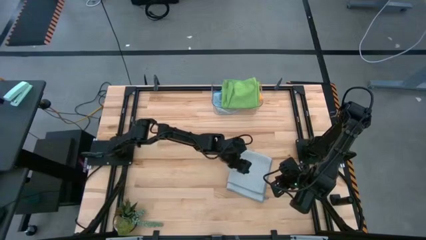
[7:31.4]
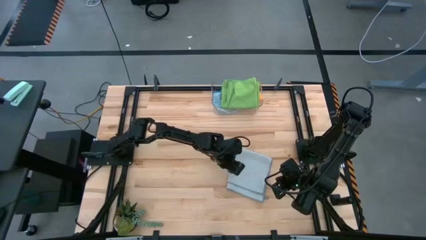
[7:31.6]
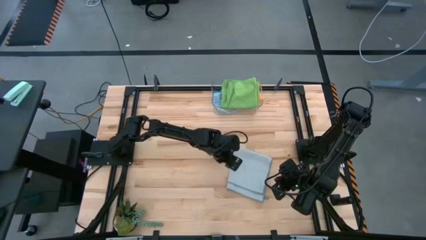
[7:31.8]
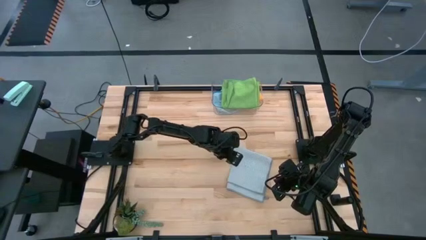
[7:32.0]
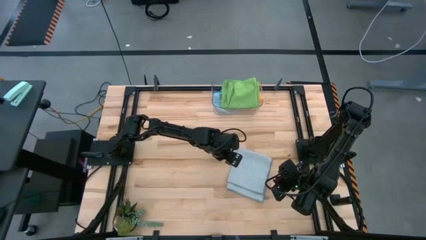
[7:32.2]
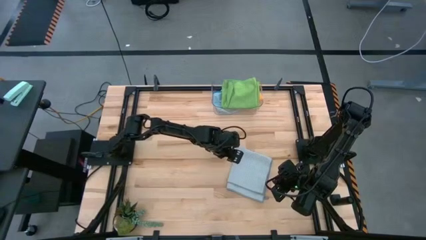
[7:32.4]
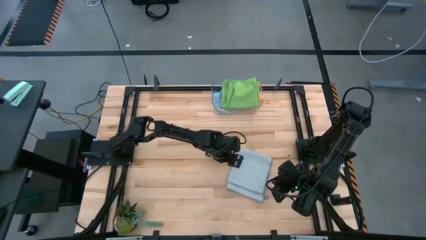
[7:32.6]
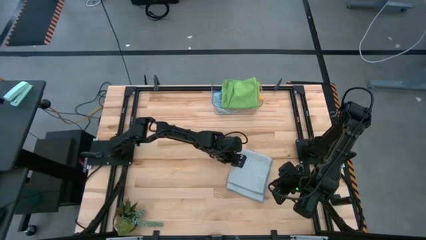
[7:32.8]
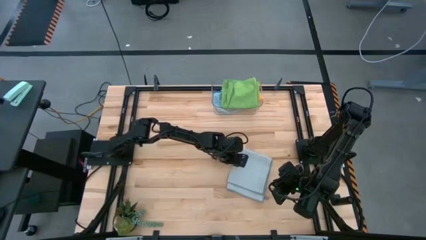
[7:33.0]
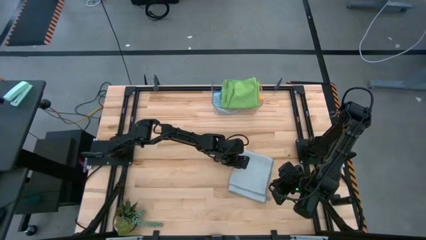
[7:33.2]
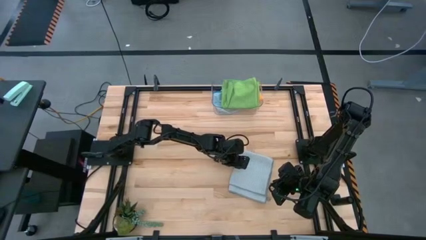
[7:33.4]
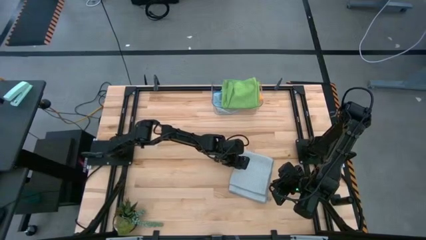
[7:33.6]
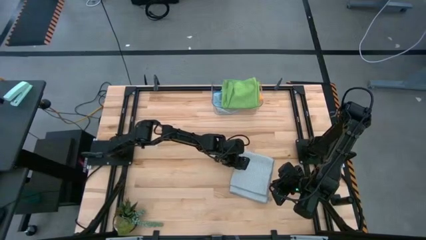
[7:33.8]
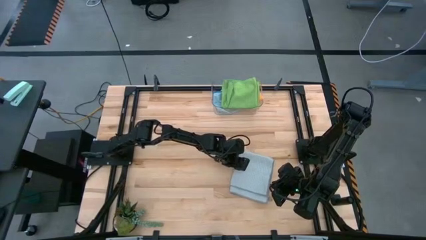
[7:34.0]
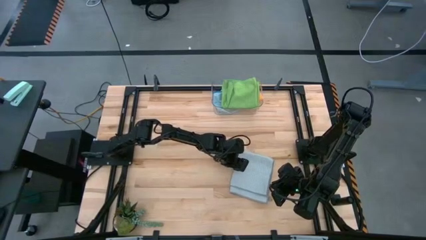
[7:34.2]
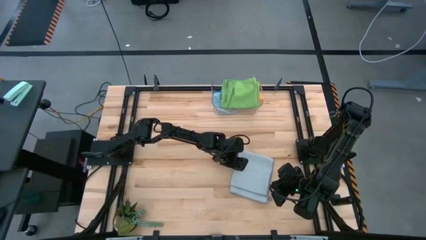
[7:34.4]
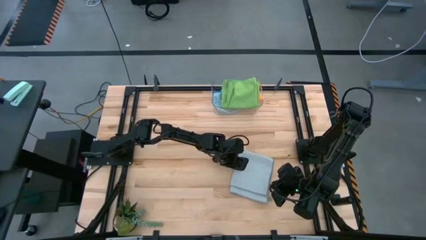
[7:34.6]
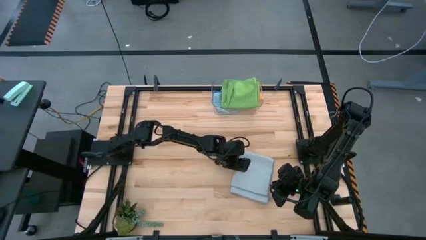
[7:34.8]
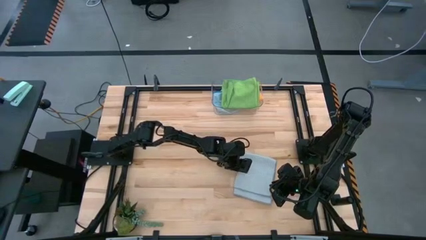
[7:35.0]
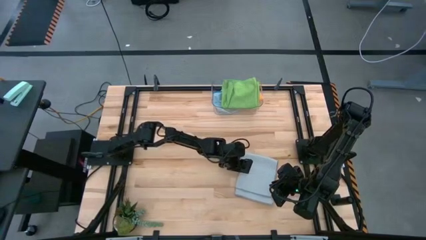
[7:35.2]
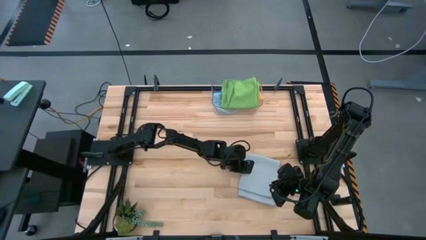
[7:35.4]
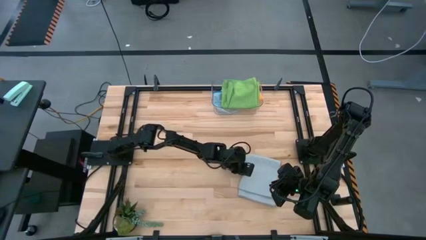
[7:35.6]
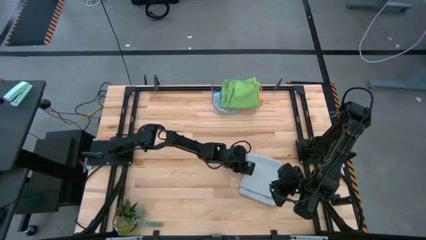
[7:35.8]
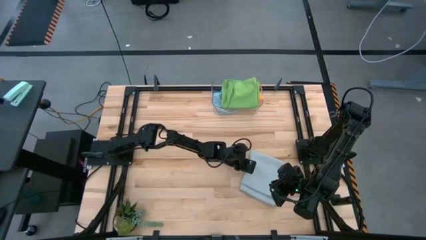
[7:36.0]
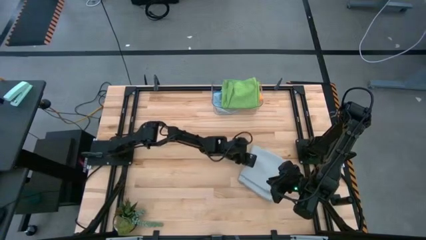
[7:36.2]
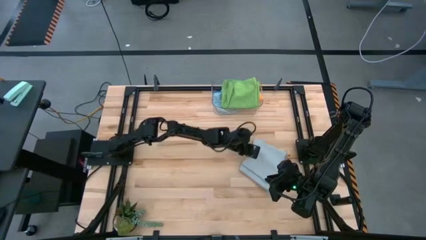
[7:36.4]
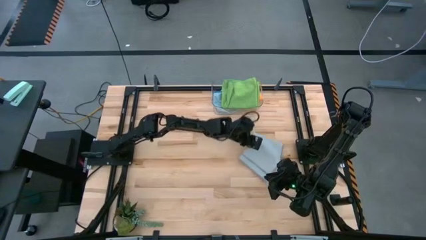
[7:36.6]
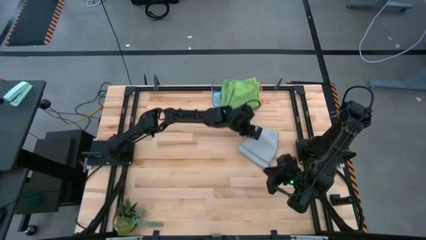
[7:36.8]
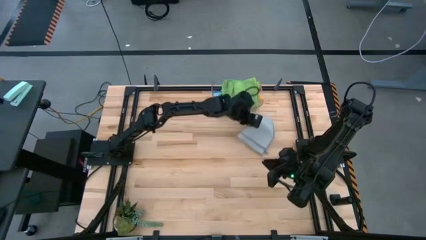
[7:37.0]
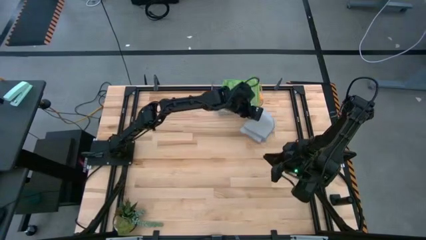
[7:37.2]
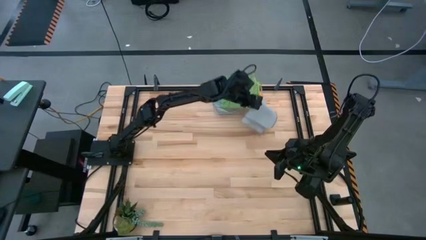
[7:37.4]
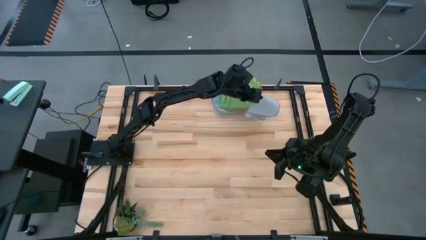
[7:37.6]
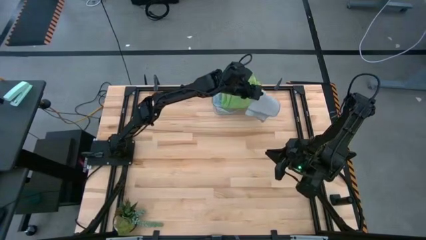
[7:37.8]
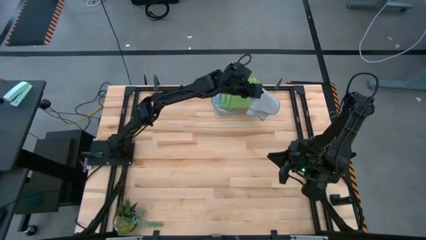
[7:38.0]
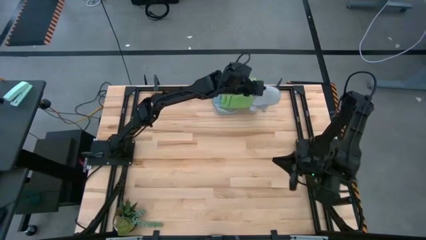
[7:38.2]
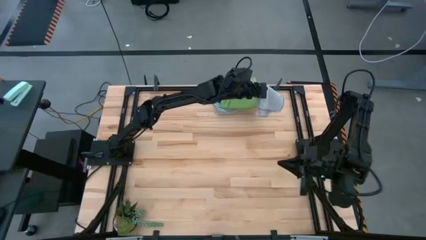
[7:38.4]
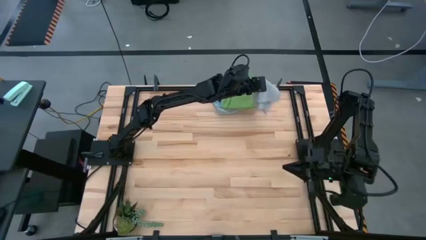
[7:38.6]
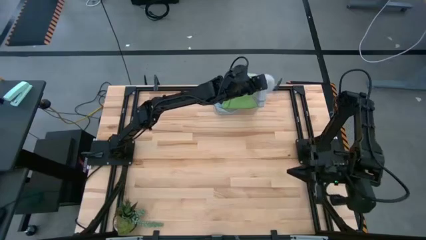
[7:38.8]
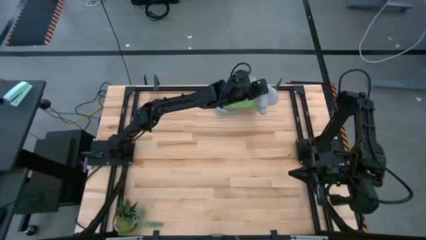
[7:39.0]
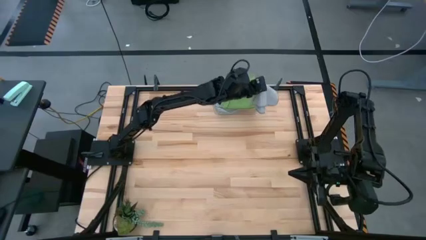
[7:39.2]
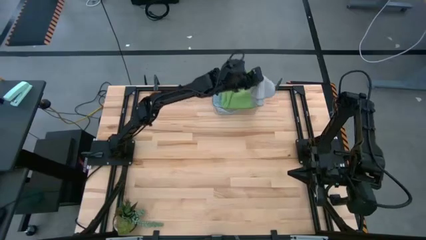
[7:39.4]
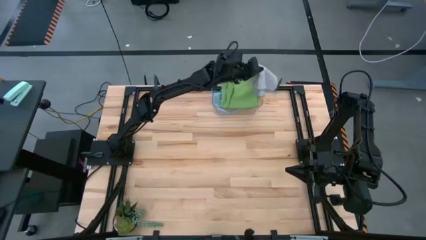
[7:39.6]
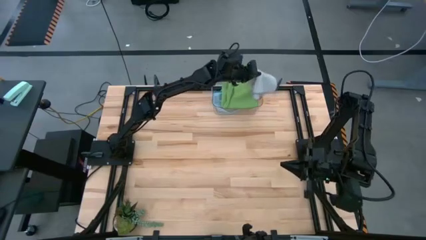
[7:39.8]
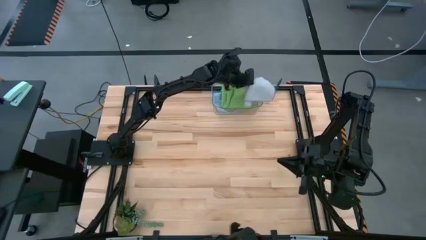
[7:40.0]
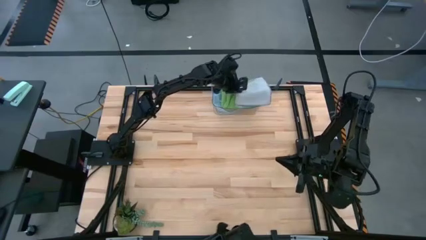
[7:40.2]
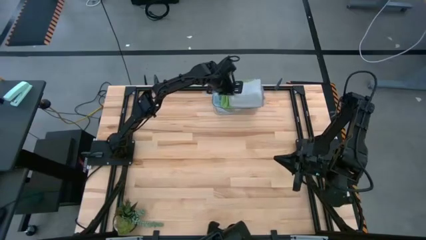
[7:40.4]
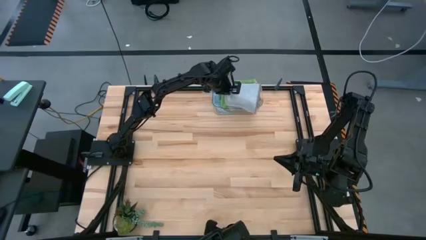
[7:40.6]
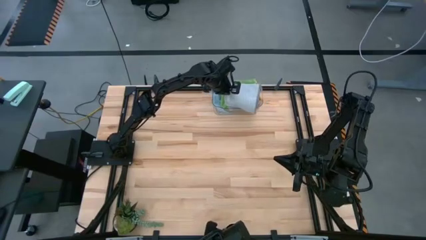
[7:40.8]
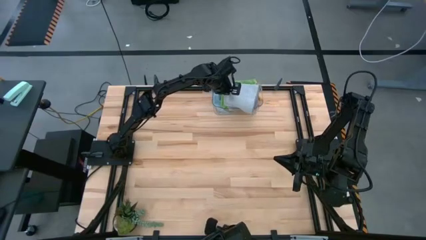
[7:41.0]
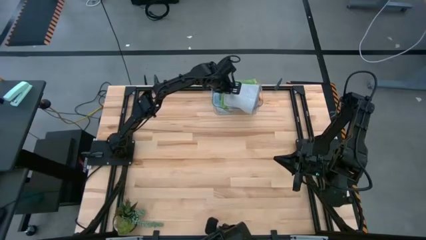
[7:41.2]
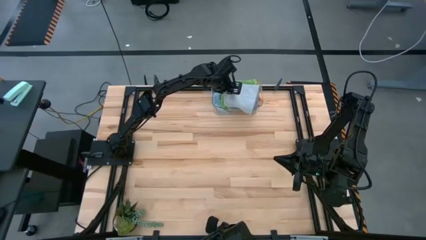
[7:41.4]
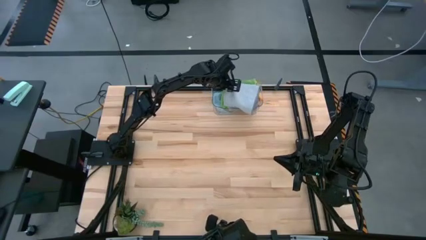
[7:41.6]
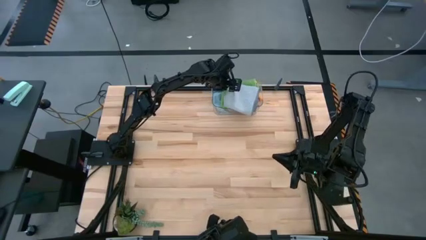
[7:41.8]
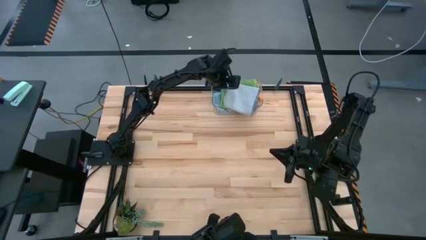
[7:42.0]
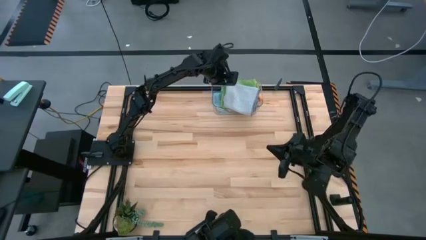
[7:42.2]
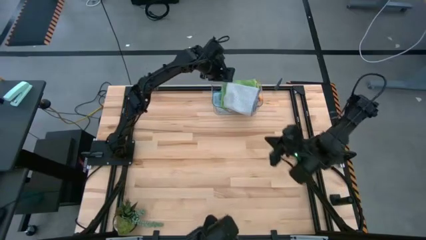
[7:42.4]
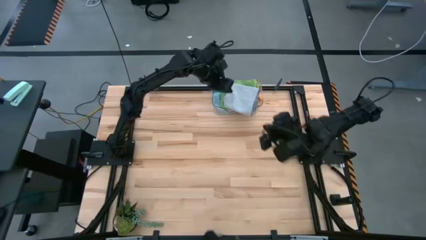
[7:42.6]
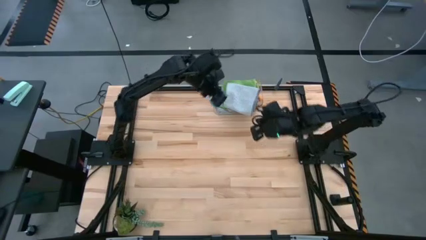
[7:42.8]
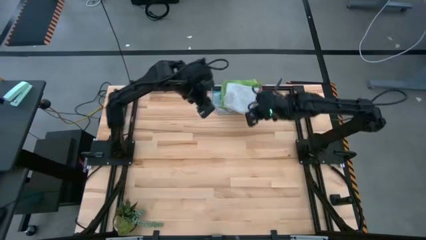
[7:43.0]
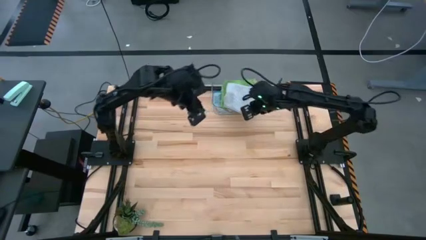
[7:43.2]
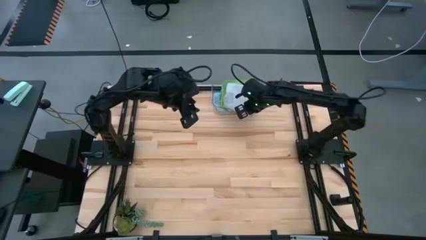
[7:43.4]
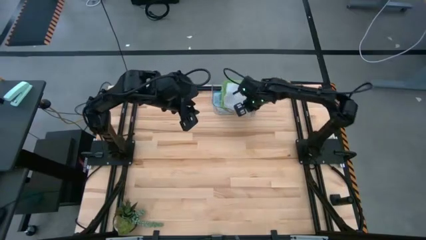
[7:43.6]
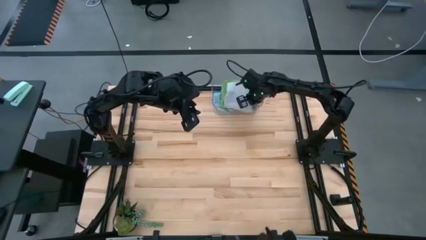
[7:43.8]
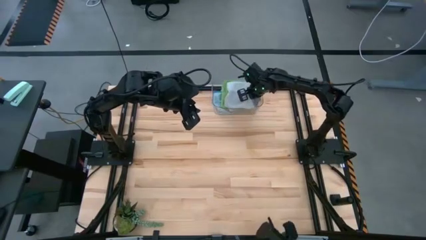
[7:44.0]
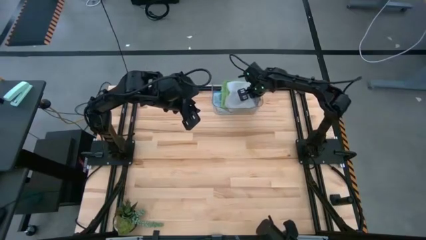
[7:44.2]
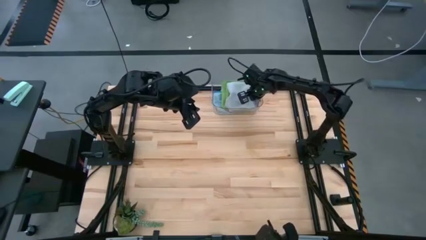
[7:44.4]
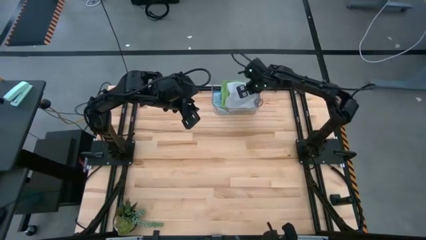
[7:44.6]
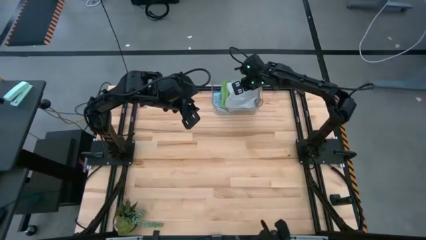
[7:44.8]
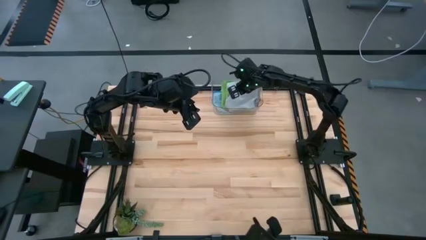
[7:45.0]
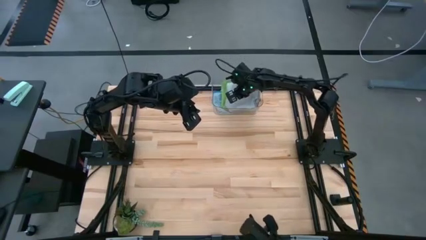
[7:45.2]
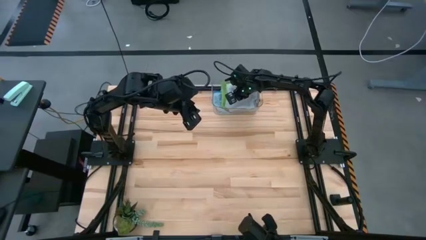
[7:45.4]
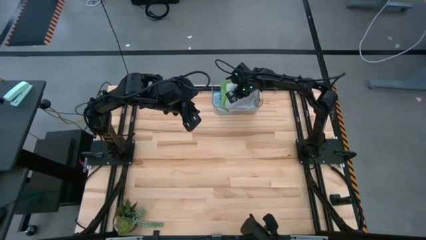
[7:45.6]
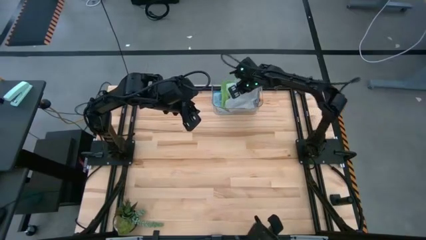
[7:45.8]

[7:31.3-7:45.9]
Task: Fold microfiber towels
Stack the gray microfiber cloth on top of the green microfiber cloth in the transparent bin

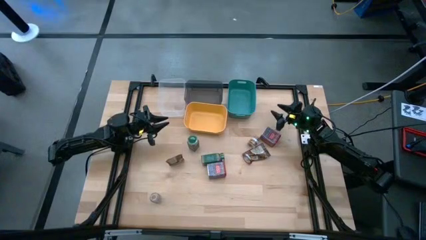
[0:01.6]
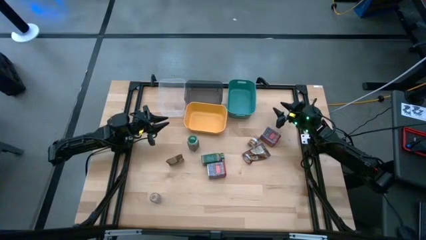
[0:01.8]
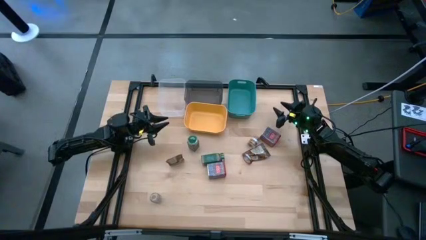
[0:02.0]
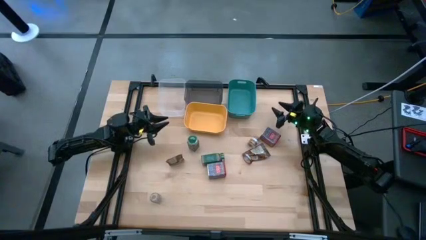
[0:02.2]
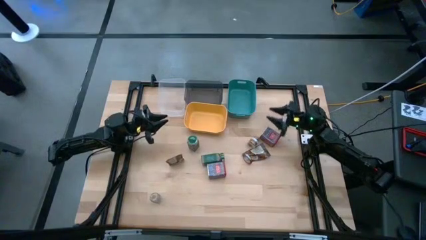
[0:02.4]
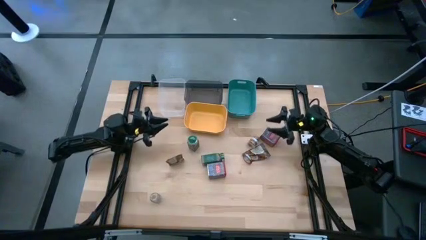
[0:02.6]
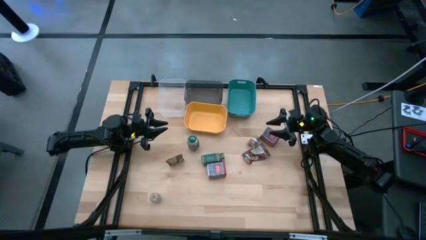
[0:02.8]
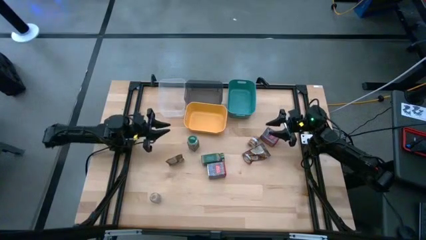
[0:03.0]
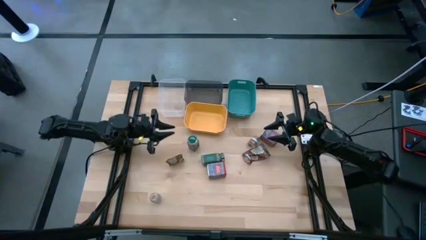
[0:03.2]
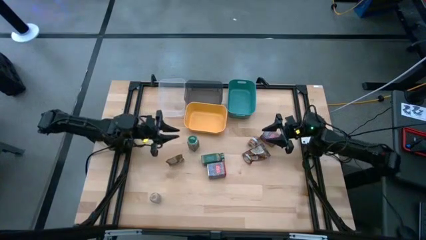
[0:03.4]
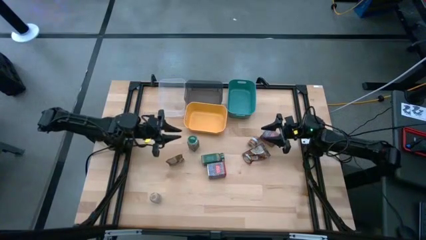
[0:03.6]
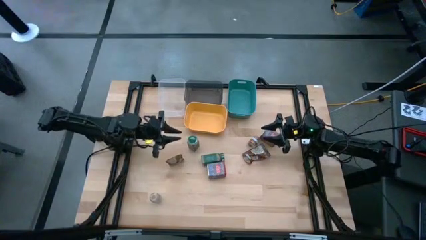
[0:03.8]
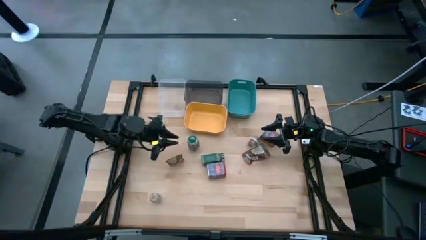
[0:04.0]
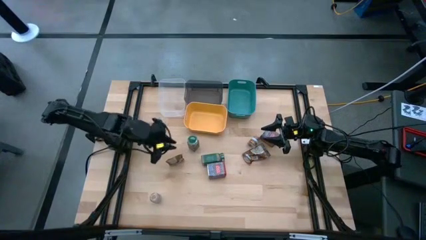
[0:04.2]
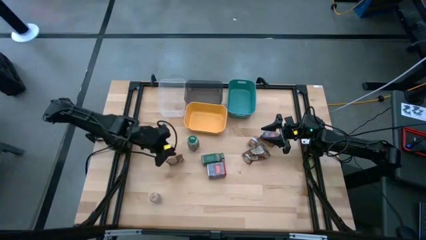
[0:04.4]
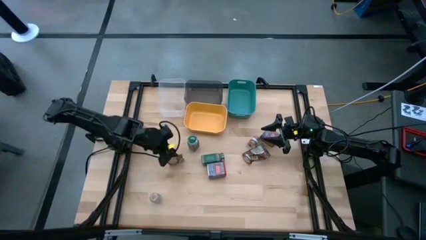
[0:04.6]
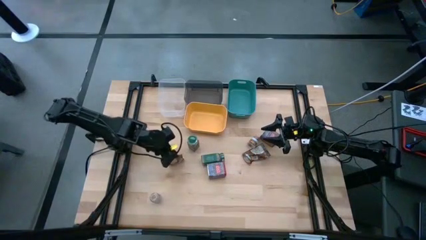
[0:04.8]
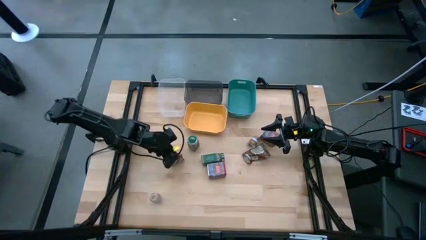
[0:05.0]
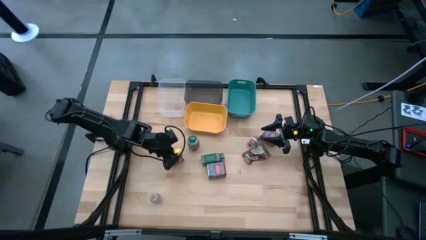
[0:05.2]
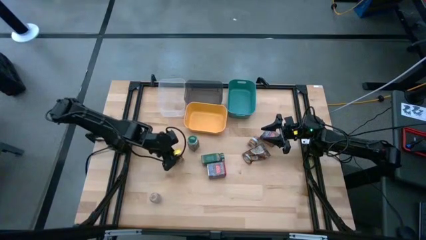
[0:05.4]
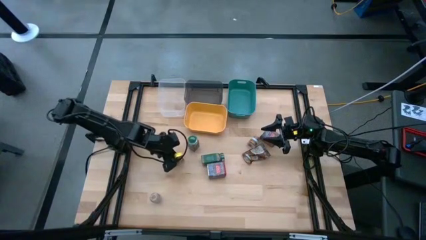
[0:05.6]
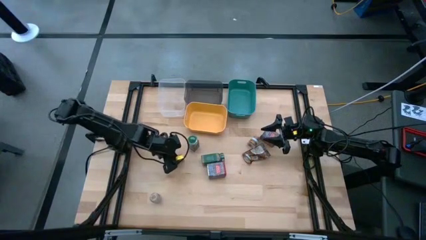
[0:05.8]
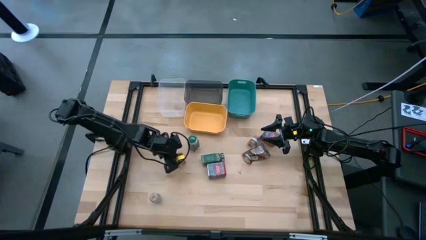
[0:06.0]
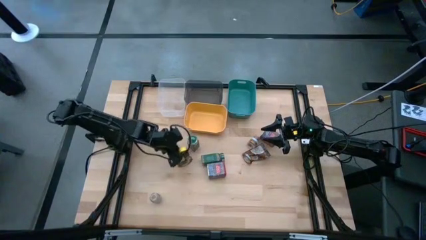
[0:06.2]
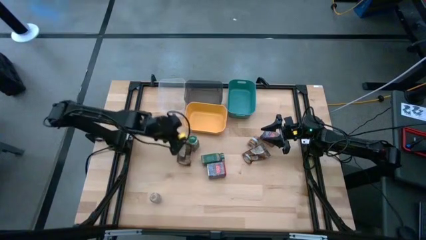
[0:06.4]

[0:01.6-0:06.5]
Task: Sort spices by type
Put the left orange seasoning bag into the transparent bin
